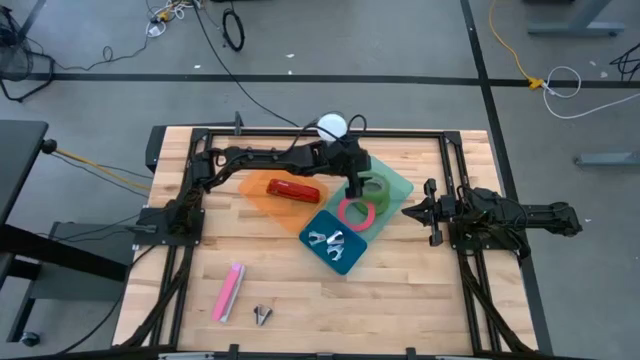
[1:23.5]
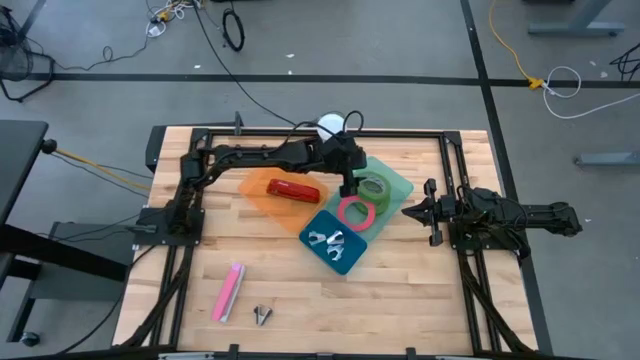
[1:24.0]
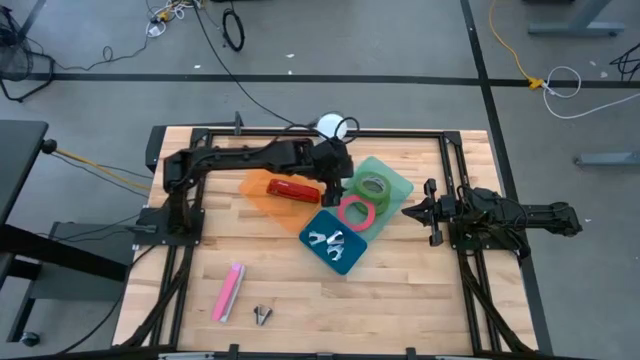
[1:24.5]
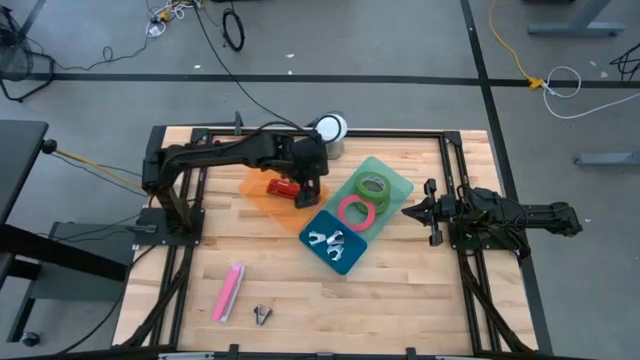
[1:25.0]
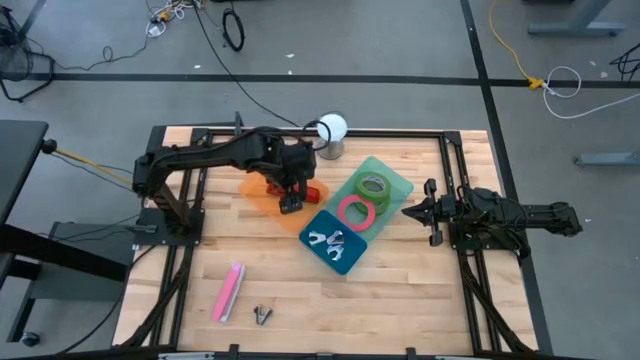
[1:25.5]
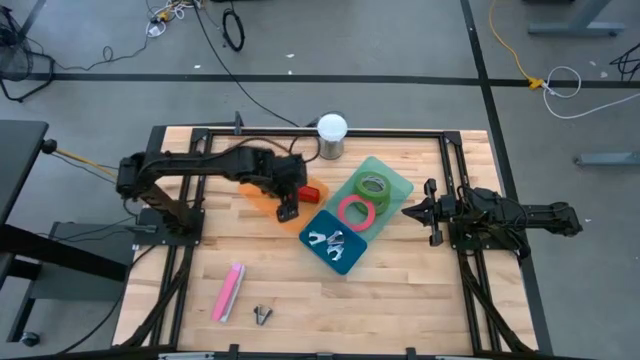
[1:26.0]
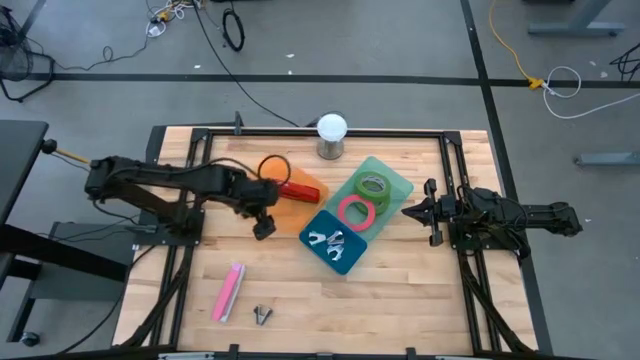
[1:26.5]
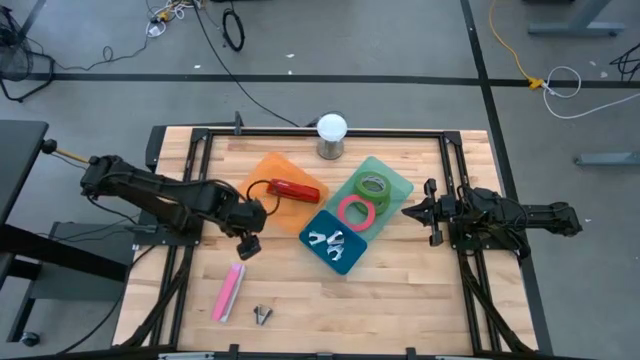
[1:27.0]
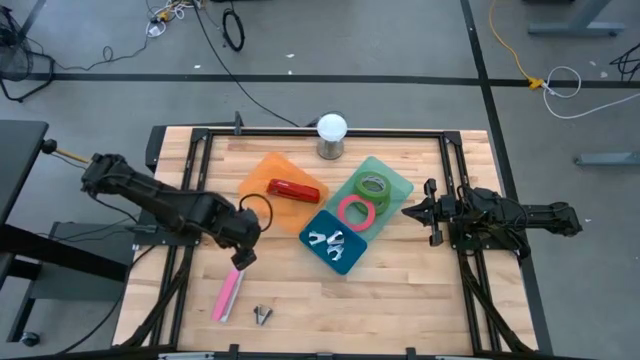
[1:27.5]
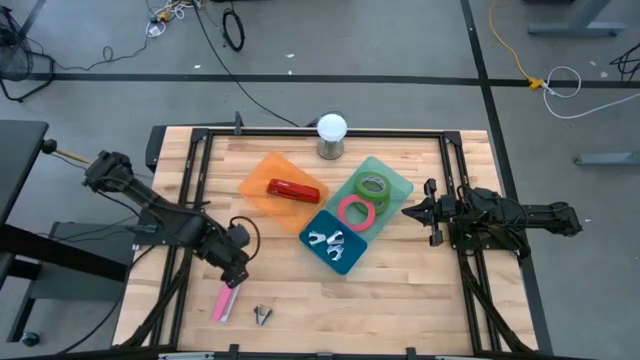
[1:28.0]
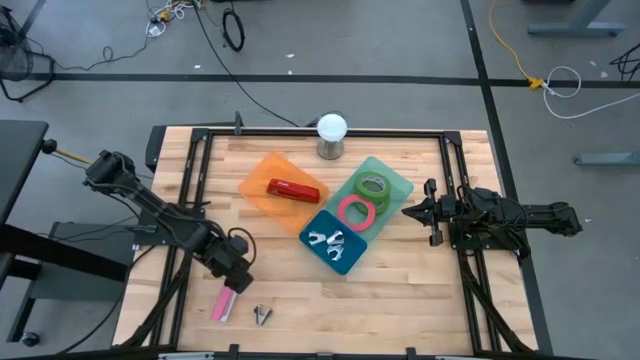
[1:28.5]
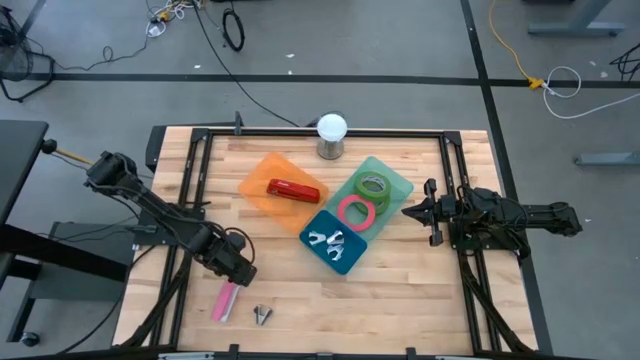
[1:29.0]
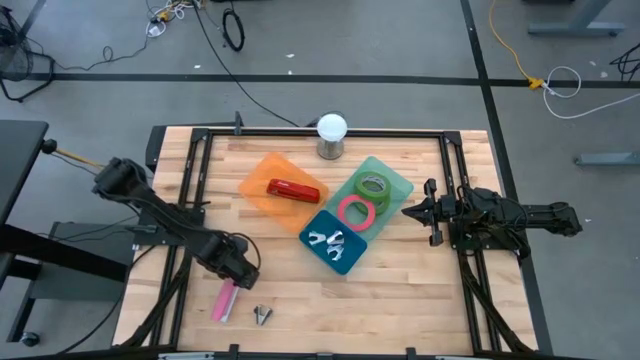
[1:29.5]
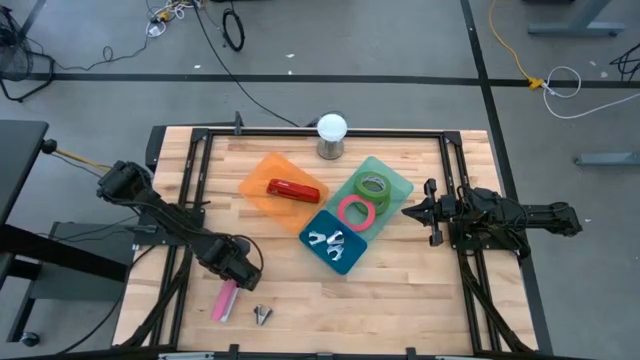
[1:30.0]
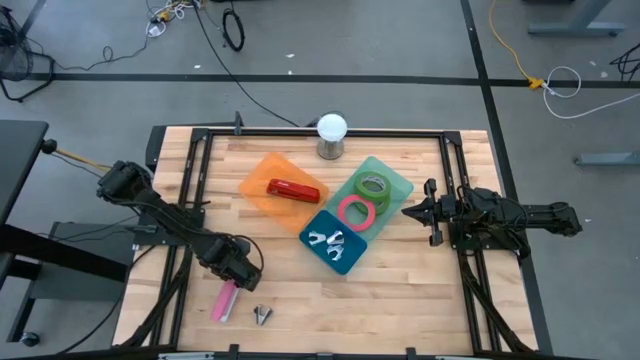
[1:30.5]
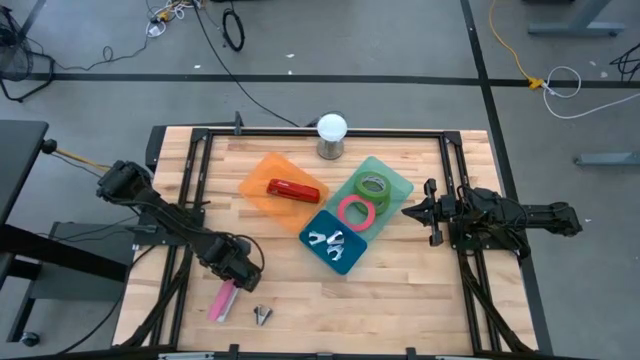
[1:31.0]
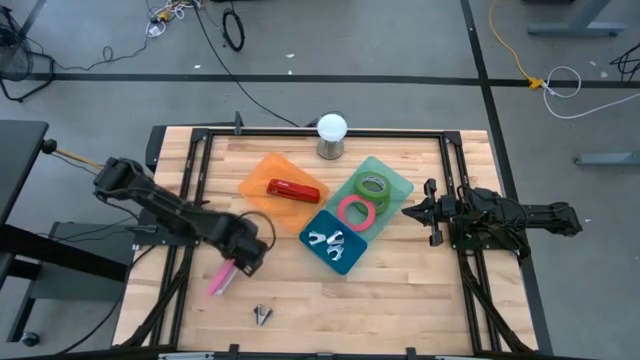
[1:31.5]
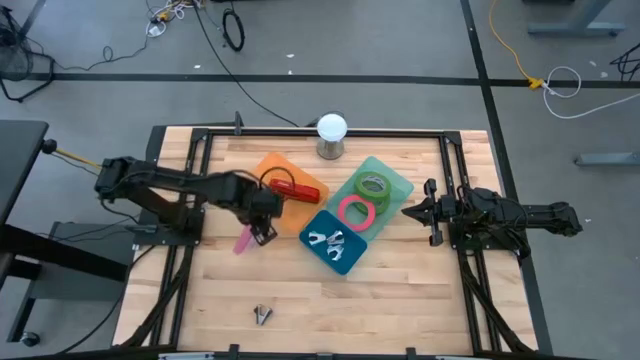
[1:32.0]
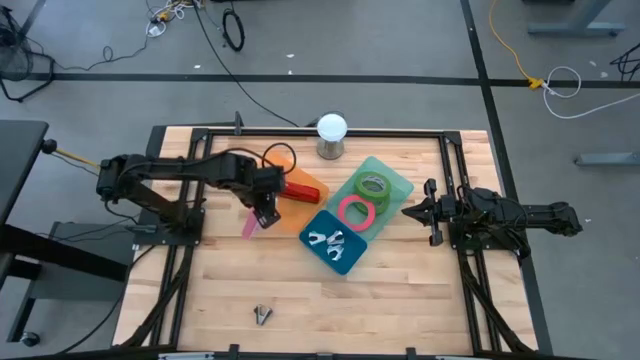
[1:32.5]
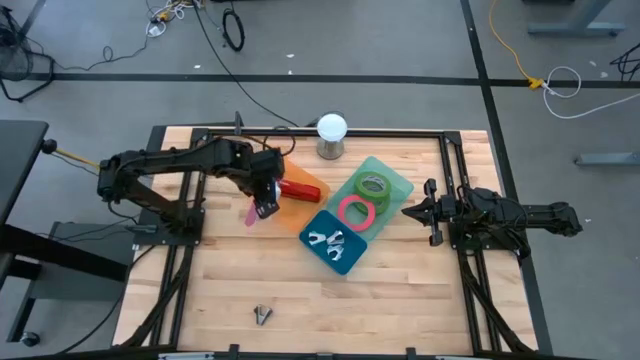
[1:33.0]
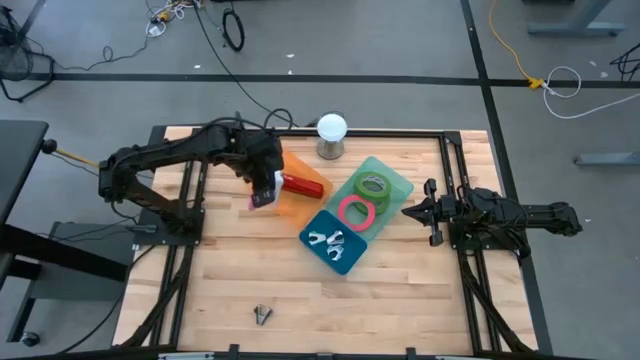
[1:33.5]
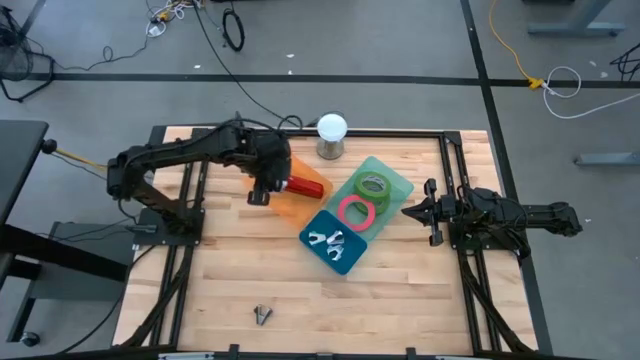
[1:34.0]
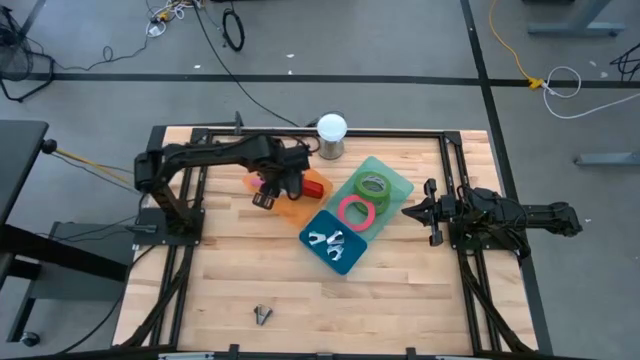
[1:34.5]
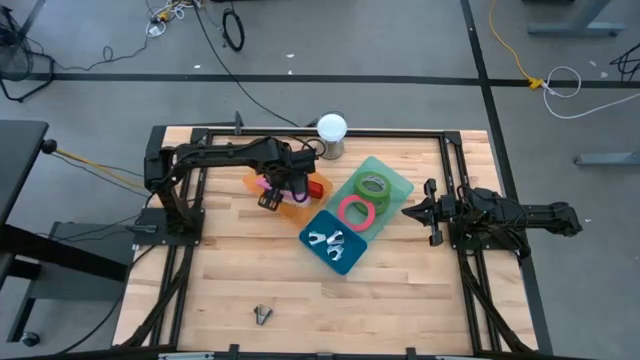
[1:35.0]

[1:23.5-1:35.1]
Task: Pick and place Stapler, Stapler remover, tape
Put the pink stapler into the orange bin

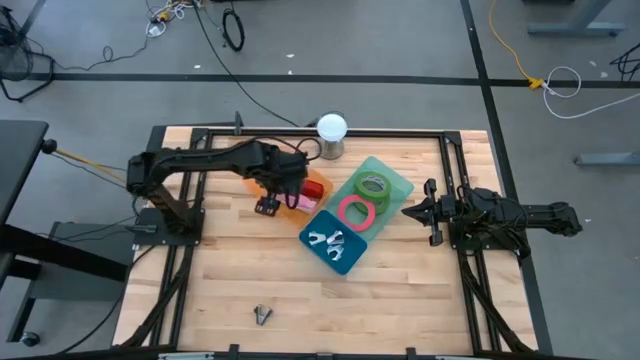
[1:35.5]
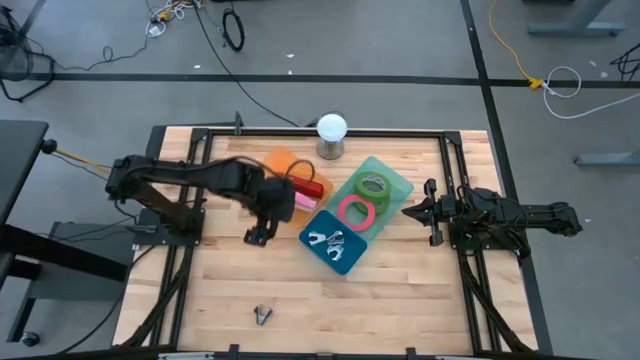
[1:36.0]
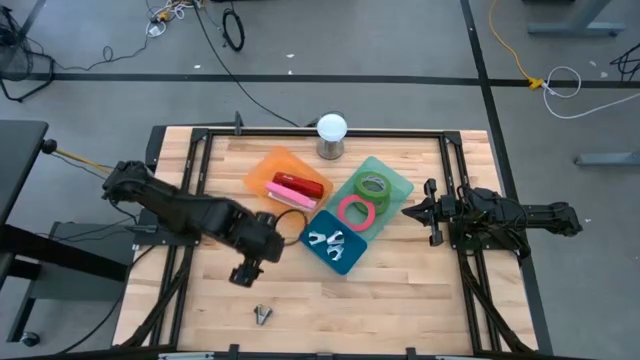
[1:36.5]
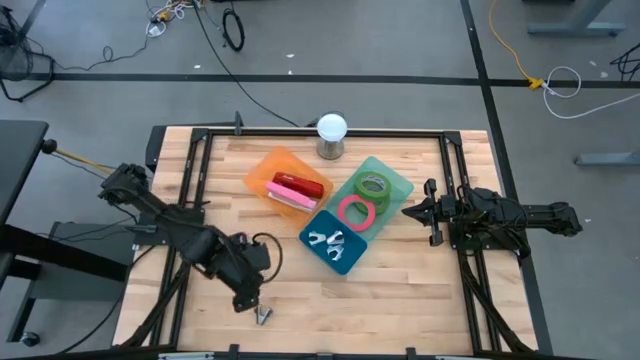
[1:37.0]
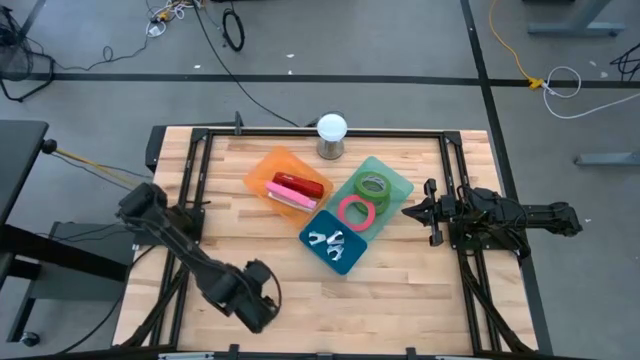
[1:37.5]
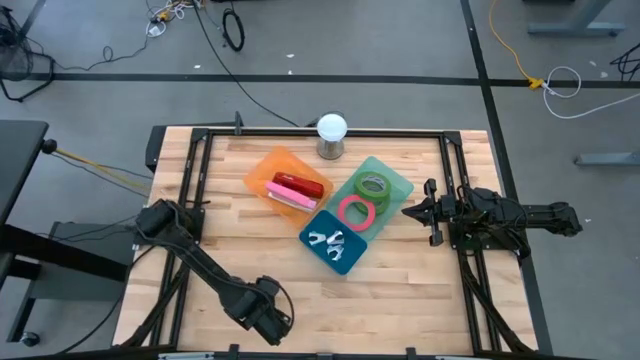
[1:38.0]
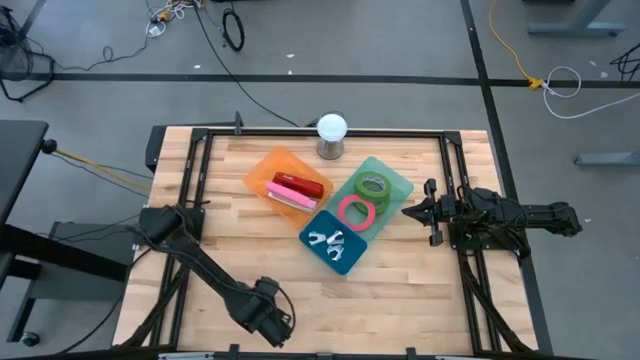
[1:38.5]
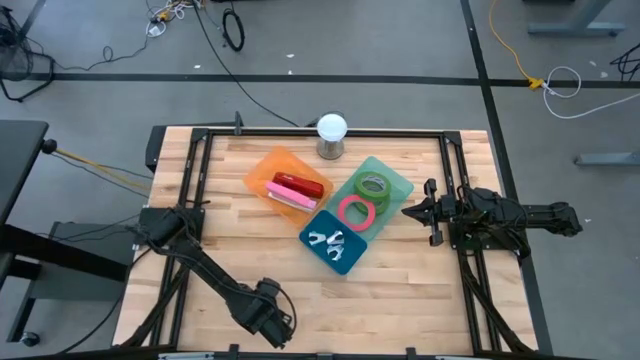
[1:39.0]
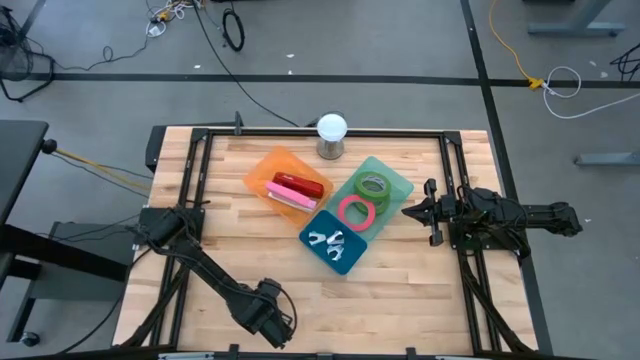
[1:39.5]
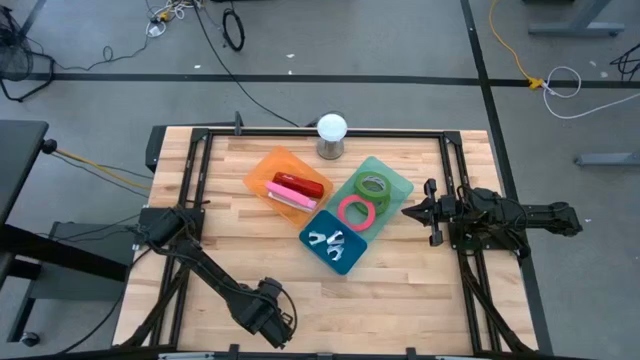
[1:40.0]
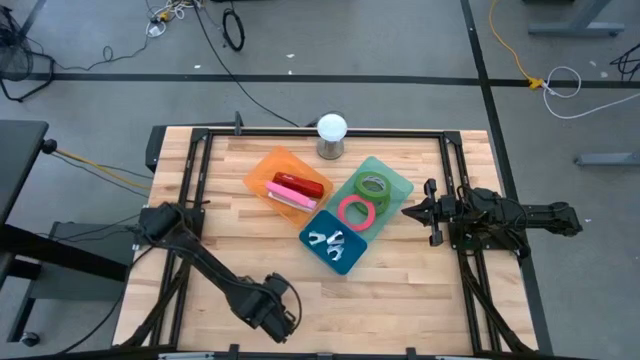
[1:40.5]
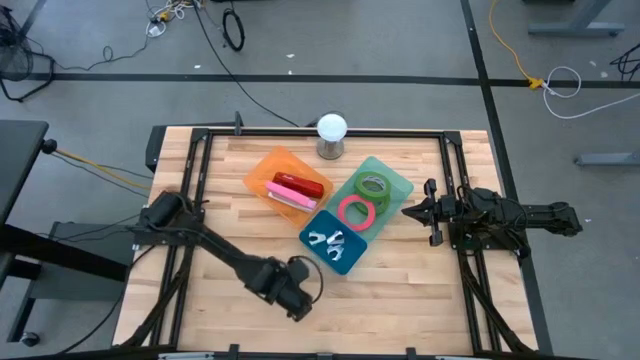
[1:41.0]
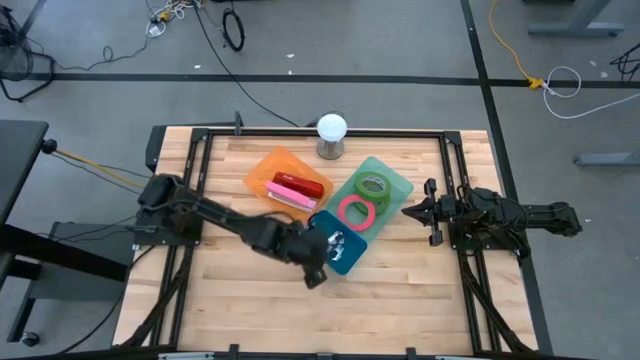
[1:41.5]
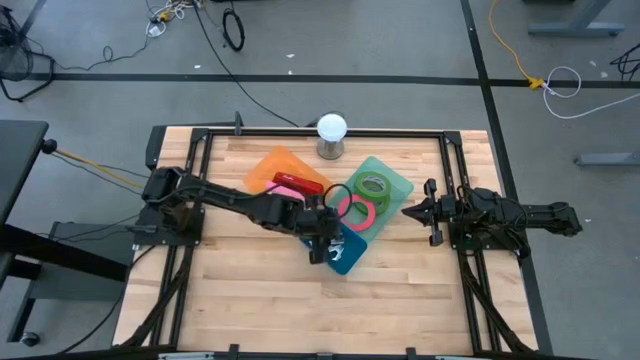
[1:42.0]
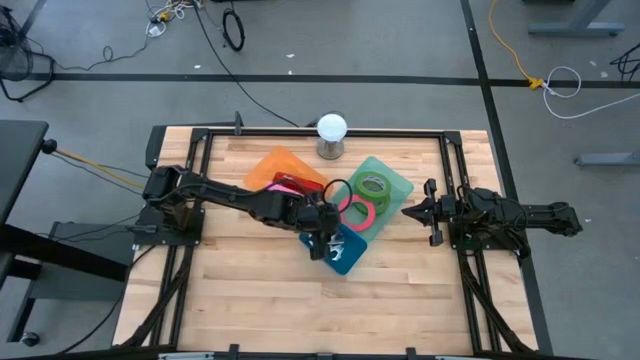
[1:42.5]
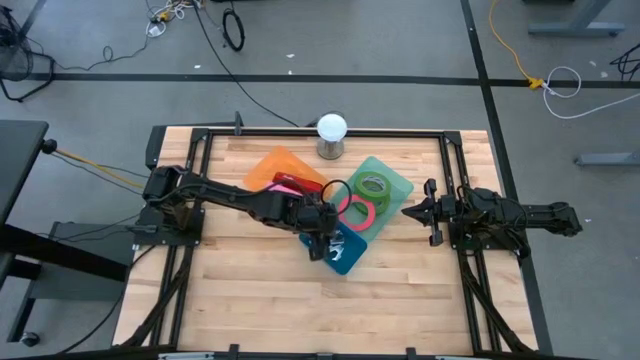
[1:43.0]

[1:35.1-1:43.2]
Put the black staple remover into the blue bin

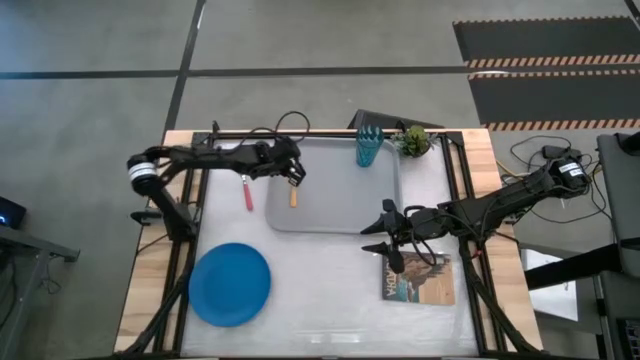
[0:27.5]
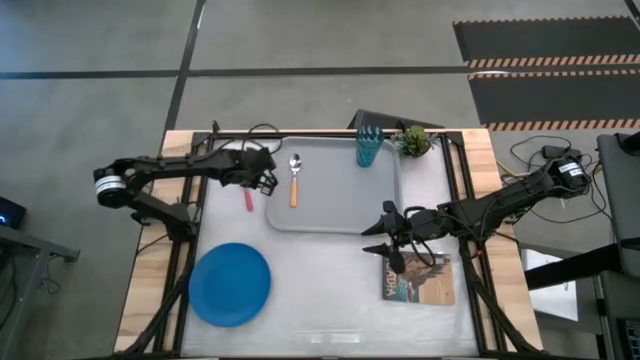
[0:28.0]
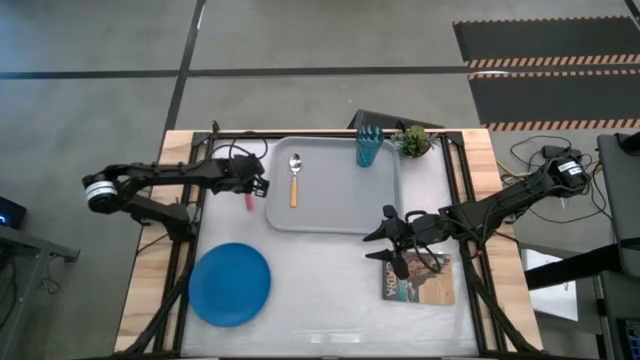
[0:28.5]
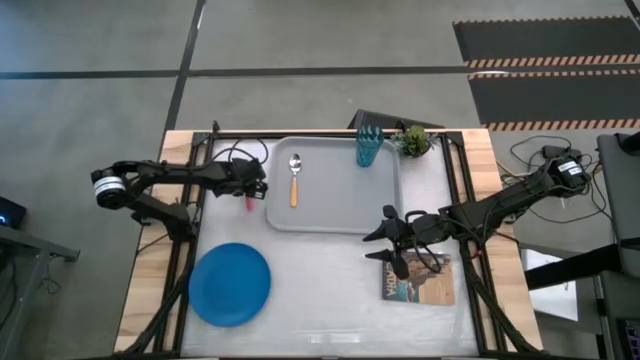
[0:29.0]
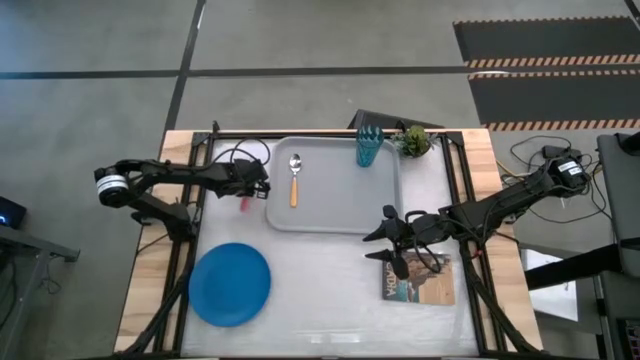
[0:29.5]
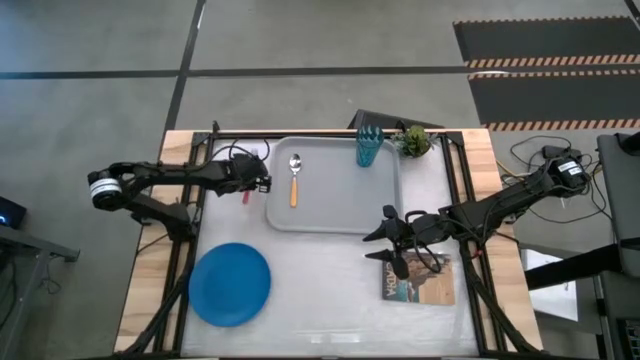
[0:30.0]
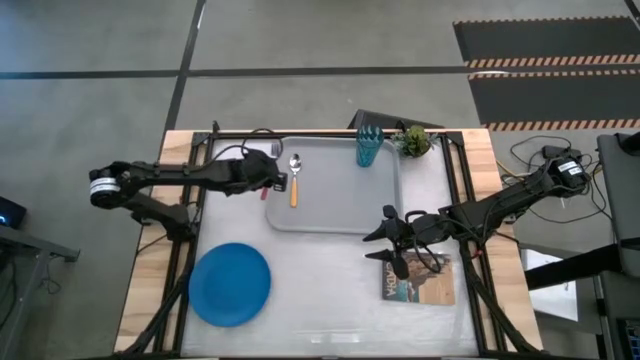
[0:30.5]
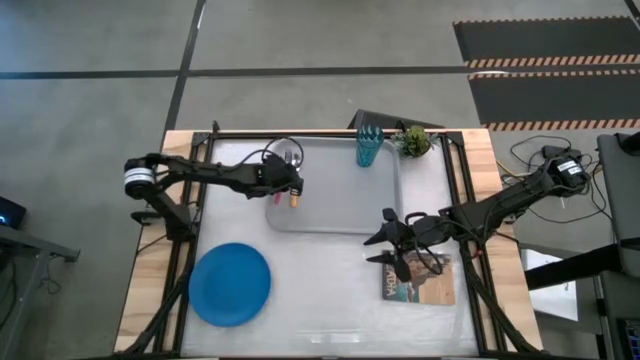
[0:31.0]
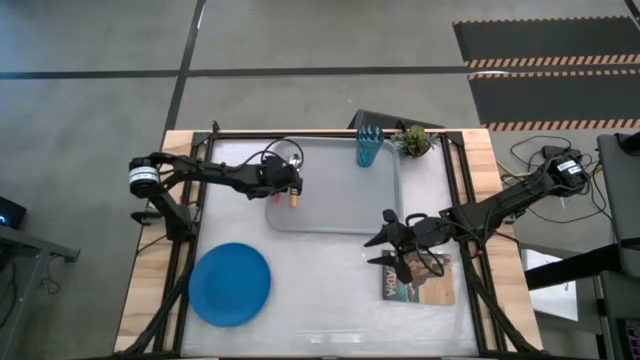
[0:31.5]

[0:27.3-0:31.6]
Task: Pick and place plate/cup/fork/spoon on tray
Put the red fork on the tray to the left side of the yellow spoon
